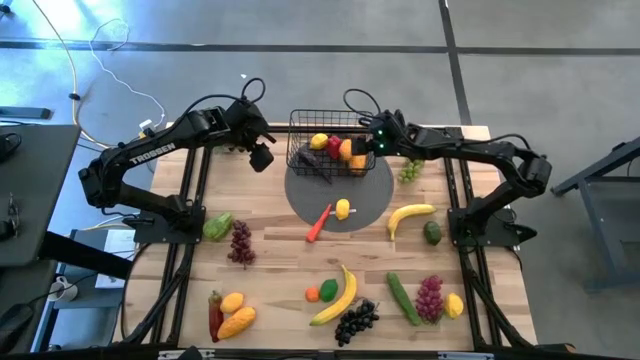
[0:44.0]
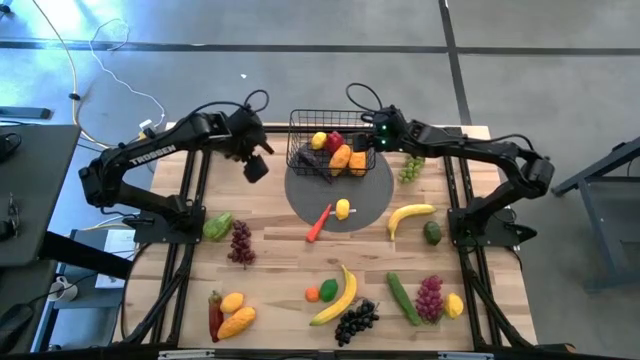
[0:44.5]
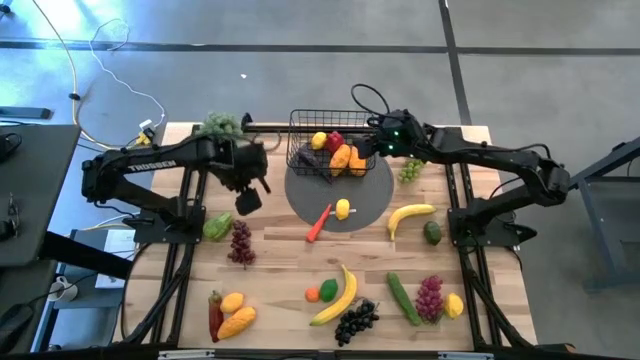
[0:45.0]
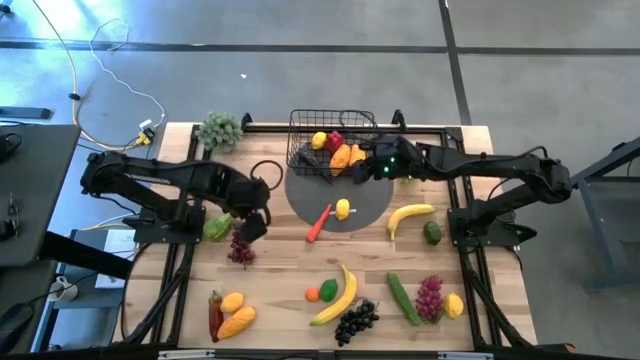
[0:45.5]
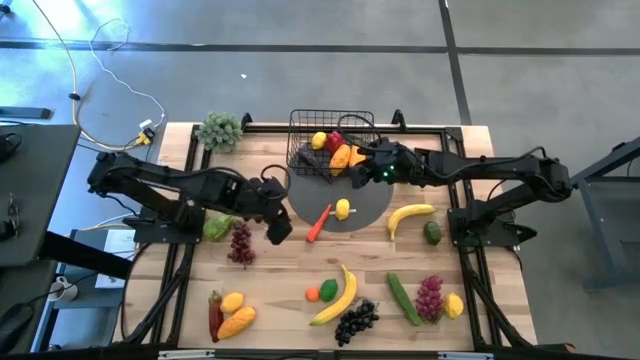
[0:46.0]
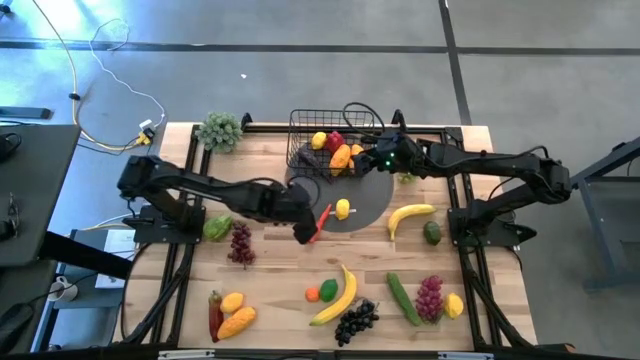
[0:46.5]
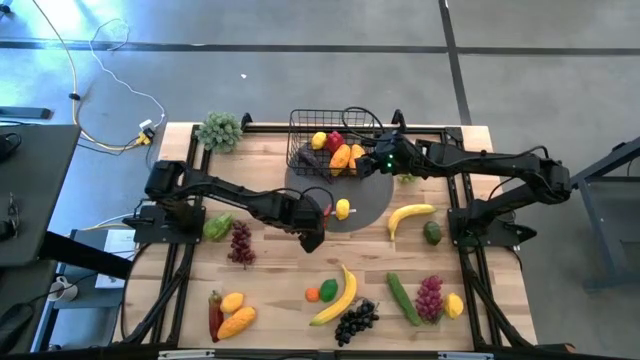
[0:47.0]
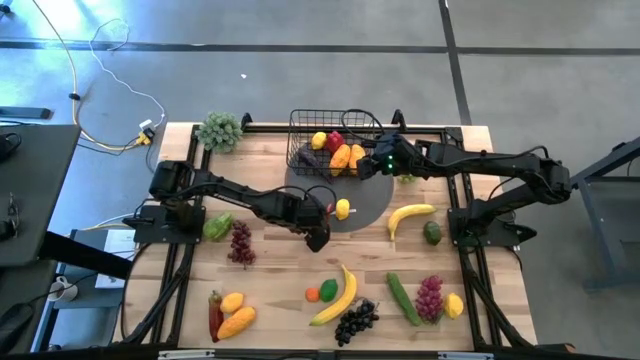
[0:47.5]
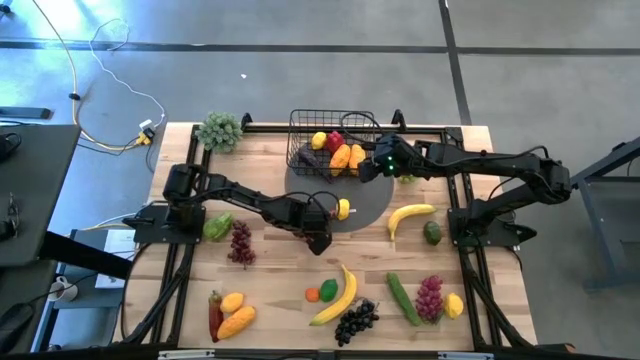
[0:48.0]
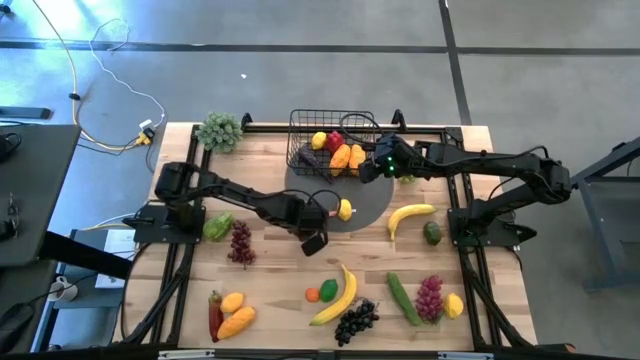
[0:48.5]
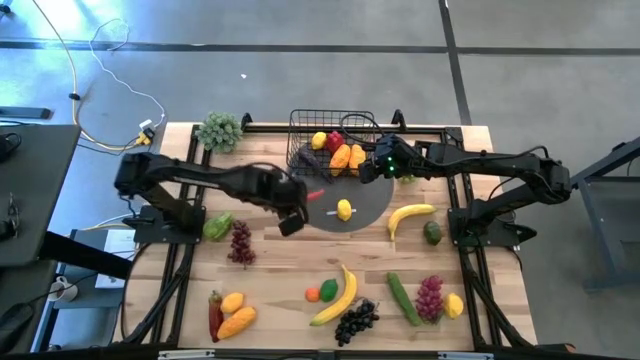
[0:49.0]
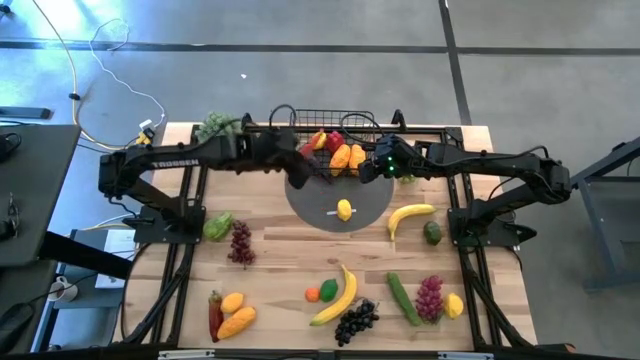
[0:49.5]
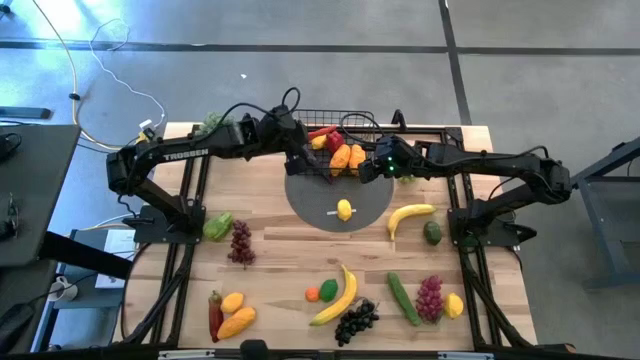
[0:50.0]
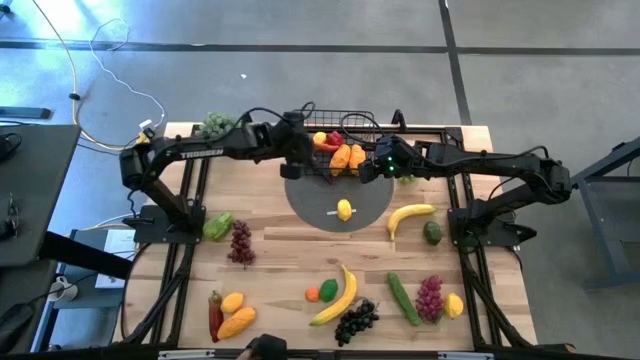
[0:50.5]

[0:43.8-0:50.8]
Task: Build produce basket
Put the carrot into the wire basket

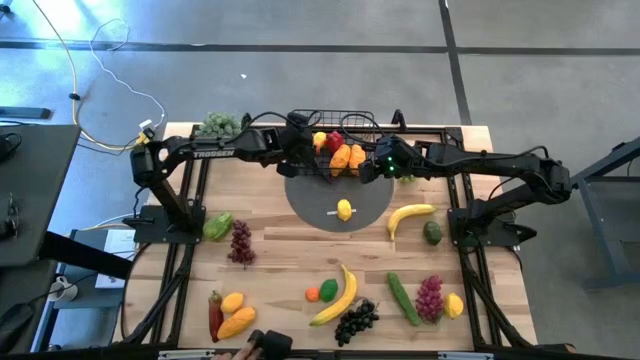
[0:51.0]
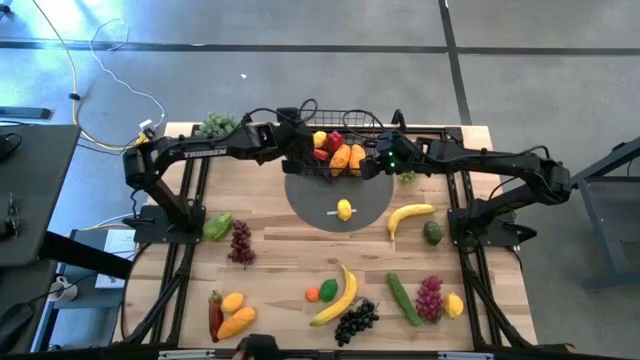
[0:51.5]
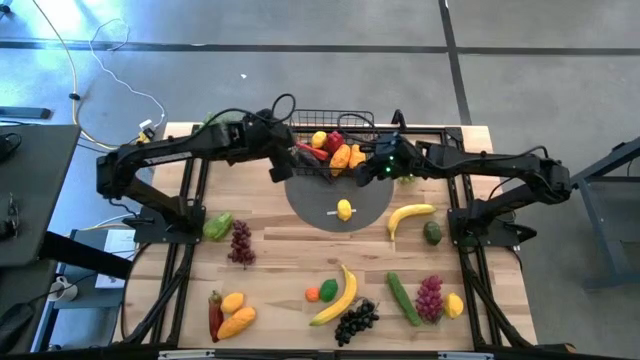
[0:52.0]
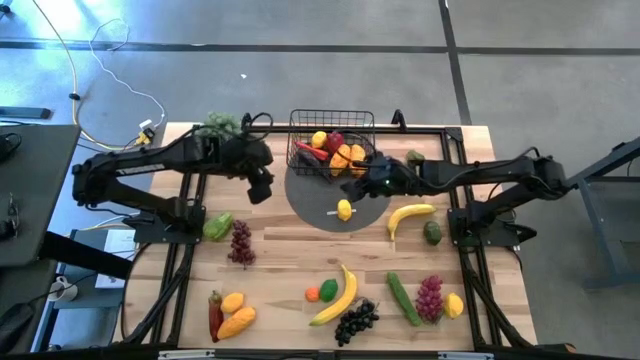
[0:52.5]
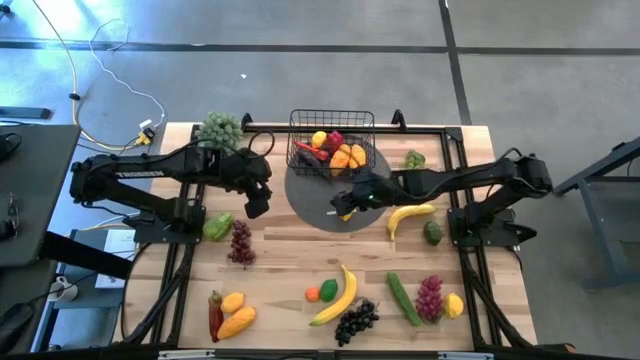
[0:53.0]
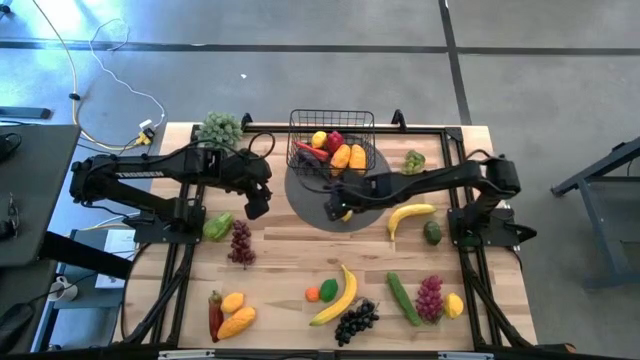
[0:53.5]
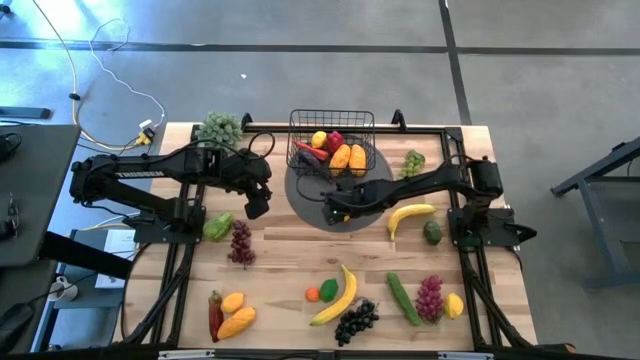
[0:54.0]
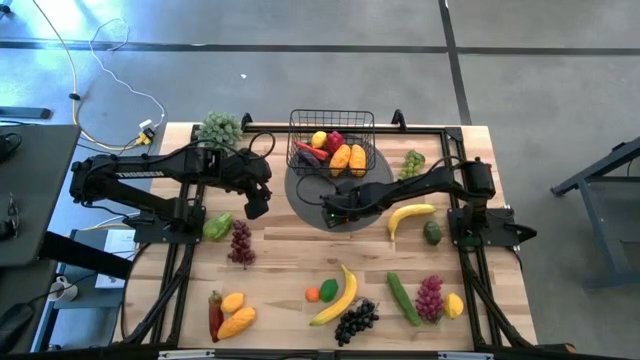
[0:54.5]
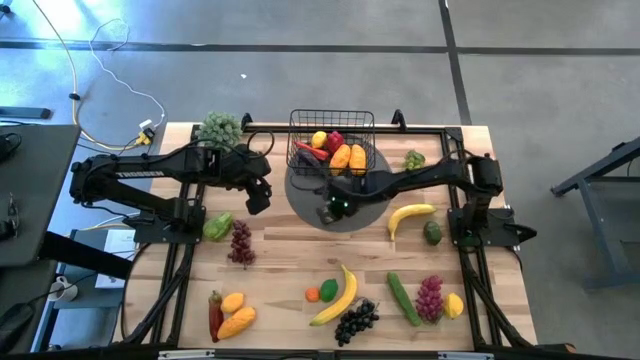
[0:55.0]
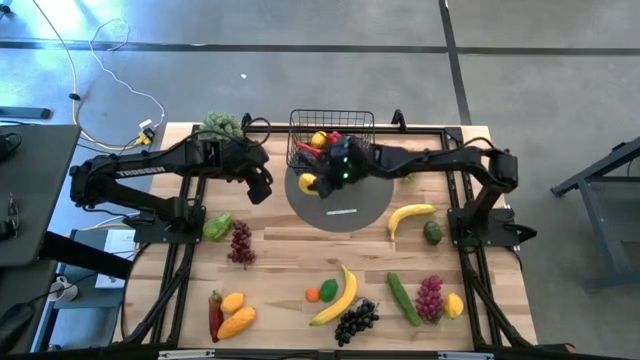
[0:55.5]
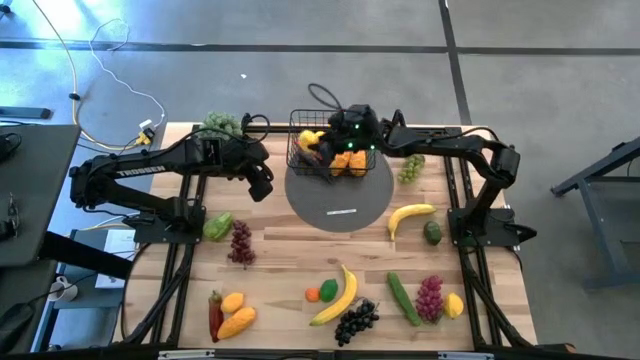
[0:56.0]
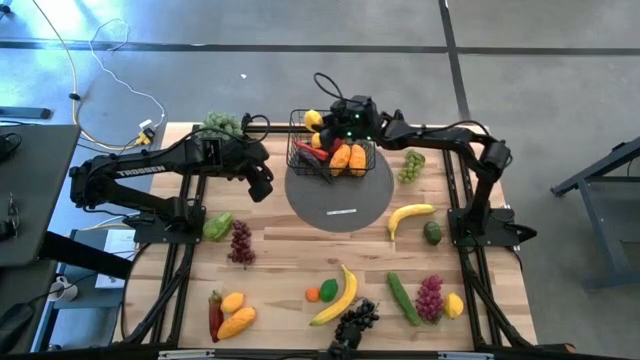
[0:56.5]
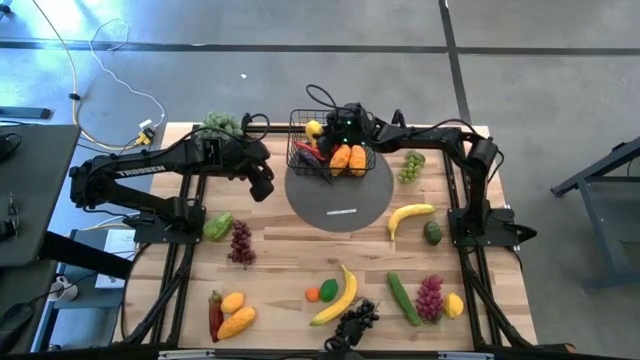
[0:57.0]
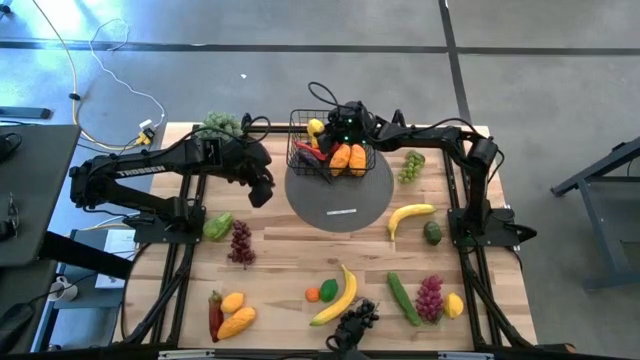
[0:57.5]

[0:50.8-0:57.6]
Put the lemon into the wire basket

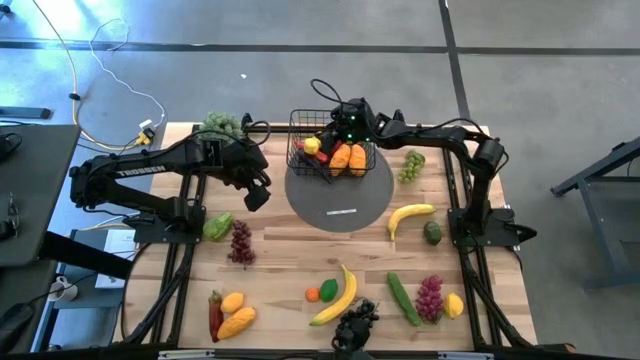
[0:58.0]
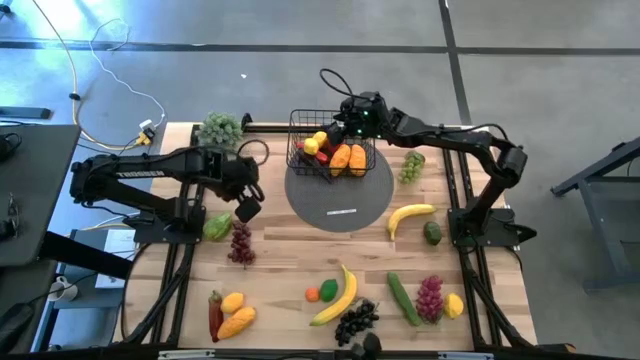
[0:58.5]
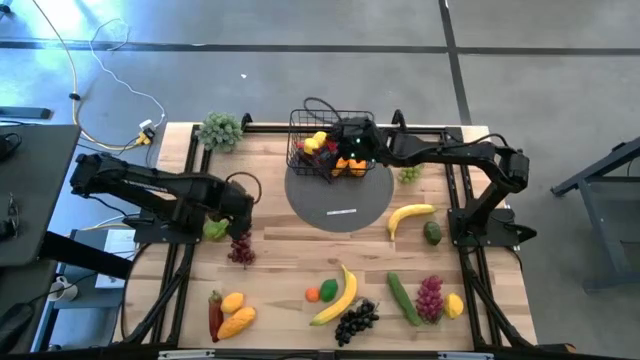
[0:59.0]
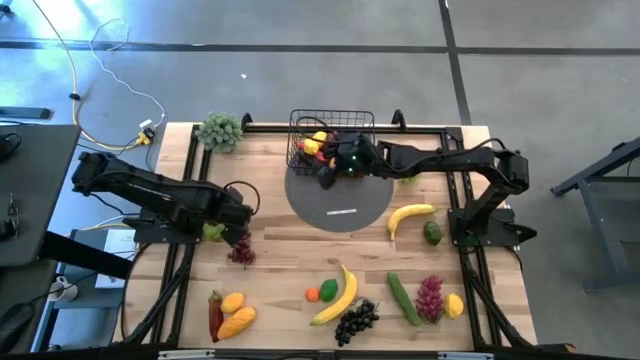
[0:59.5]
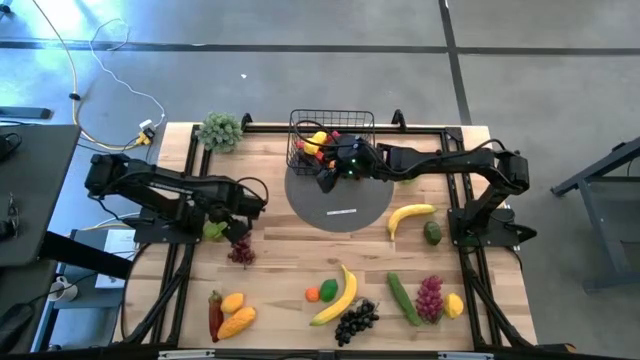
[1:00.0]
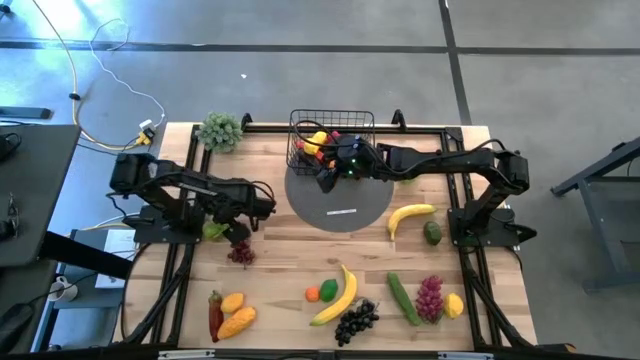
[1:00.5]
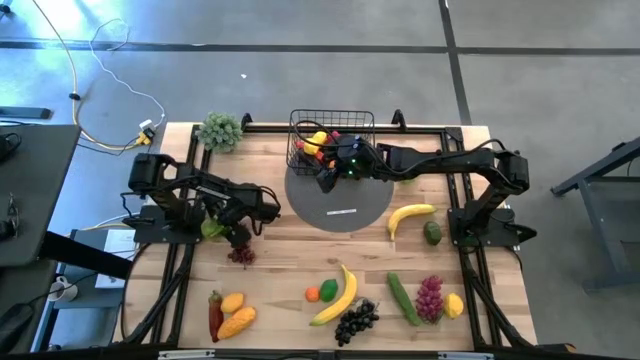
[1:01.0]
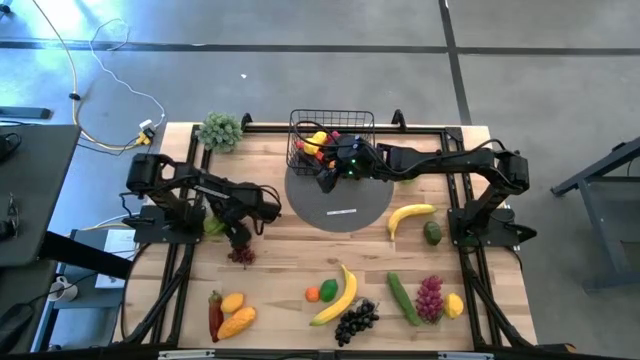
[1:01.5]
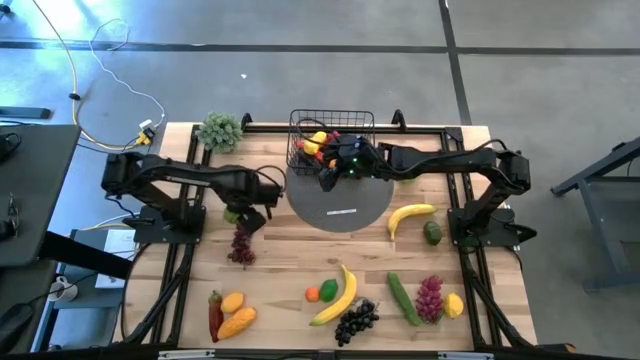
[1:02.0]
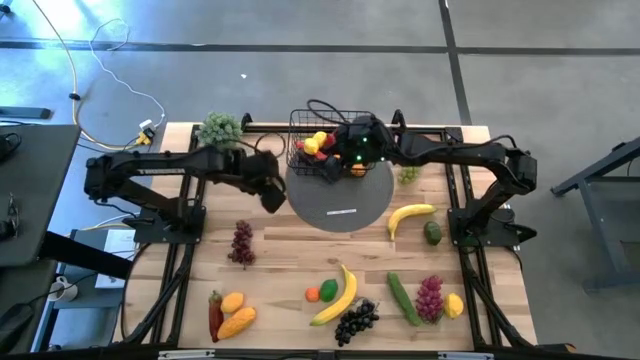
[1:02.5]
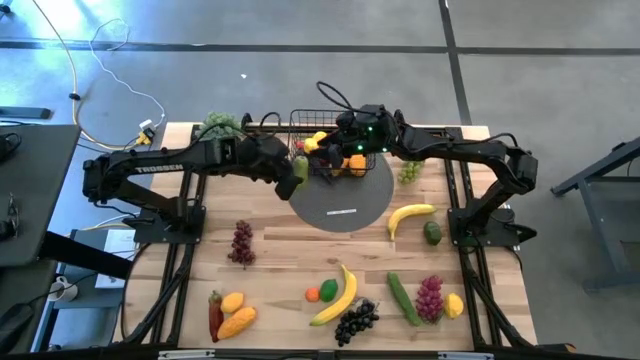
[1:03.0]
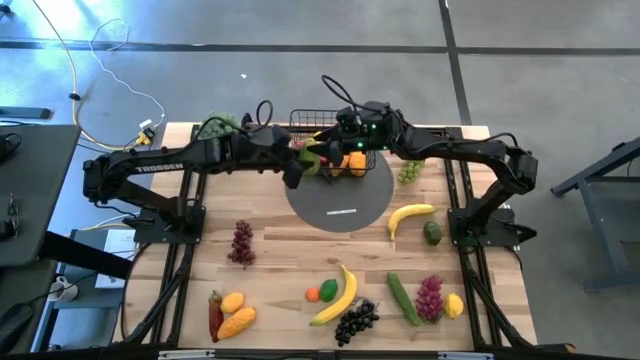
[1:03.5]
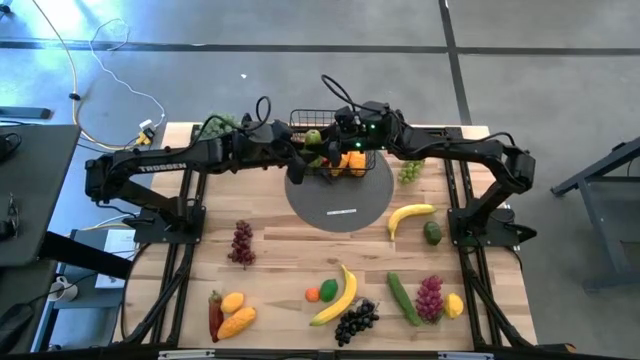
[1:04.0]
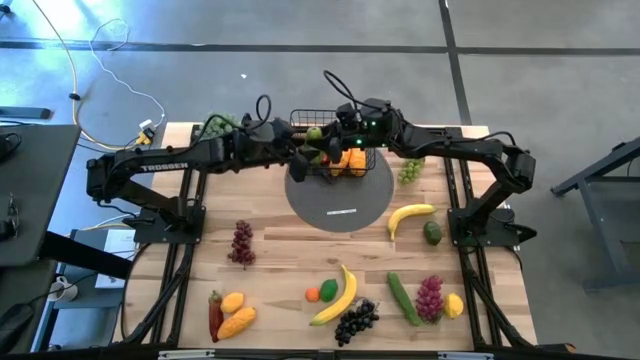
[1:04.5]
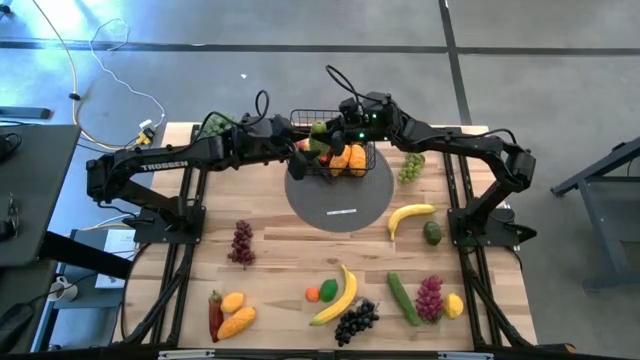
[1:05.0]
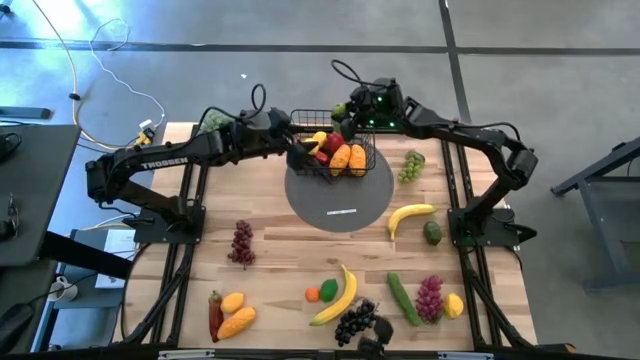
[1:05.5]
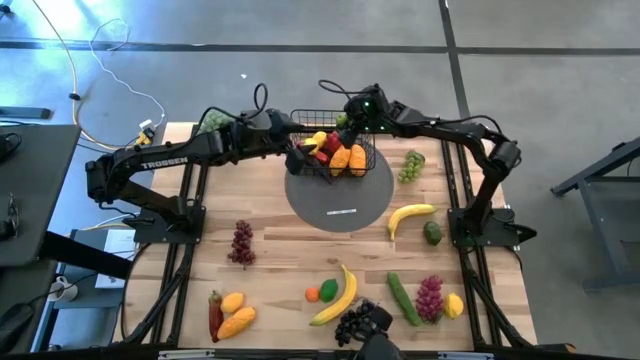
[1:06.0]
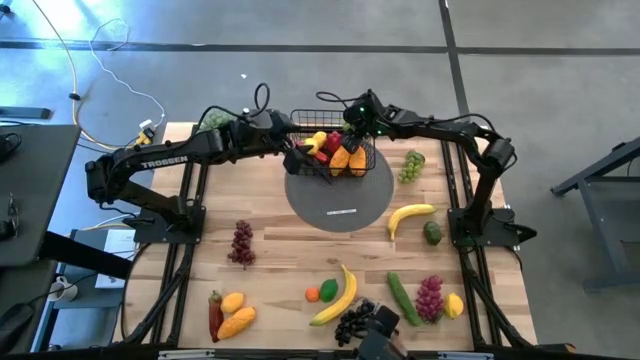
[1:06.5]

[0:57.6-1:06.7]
Put the chayote into the wire basket
